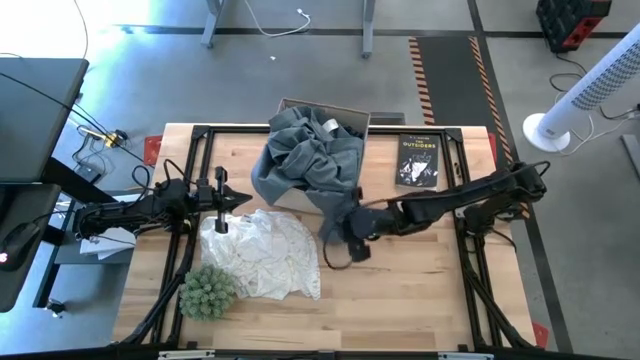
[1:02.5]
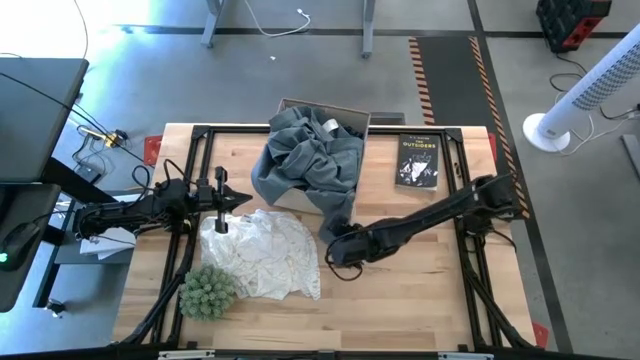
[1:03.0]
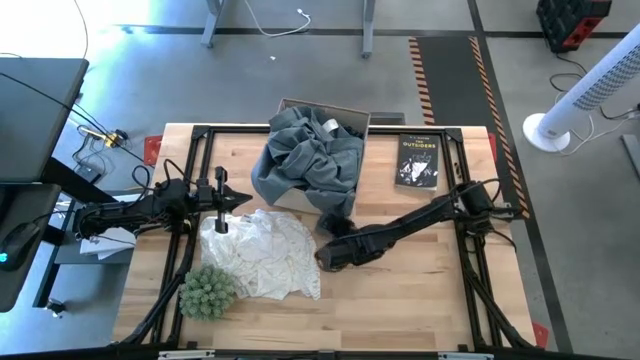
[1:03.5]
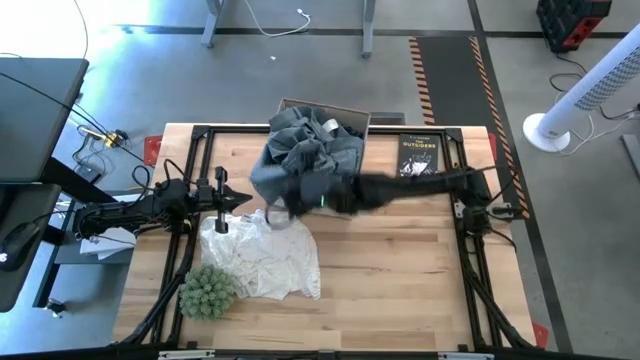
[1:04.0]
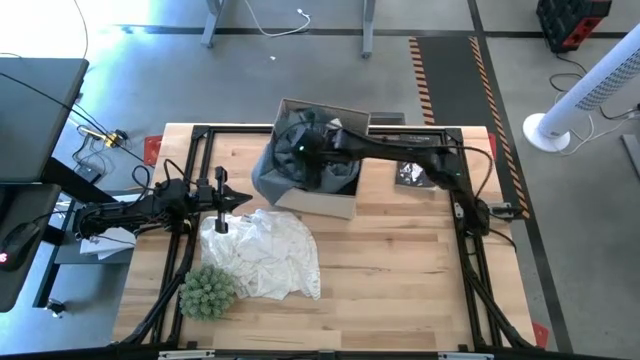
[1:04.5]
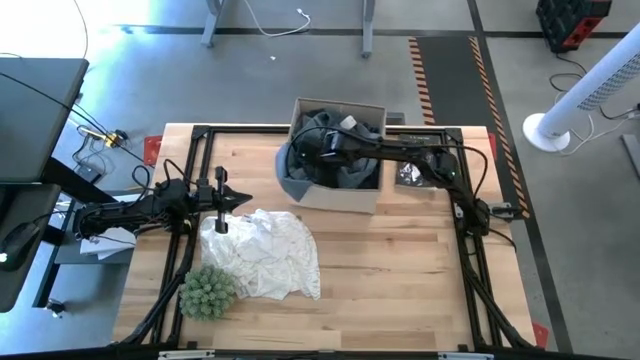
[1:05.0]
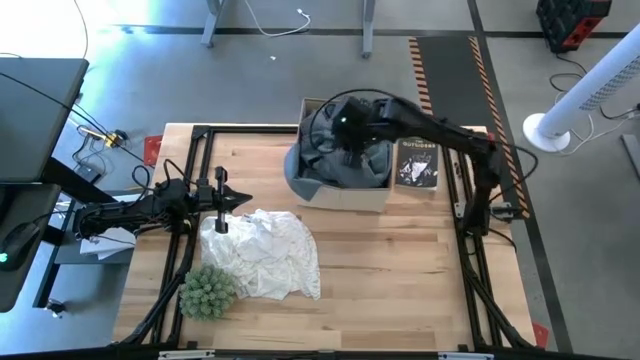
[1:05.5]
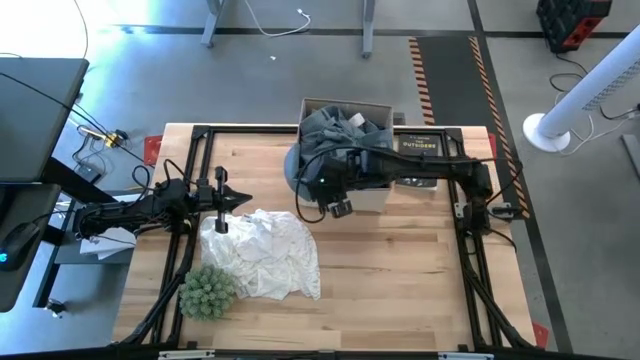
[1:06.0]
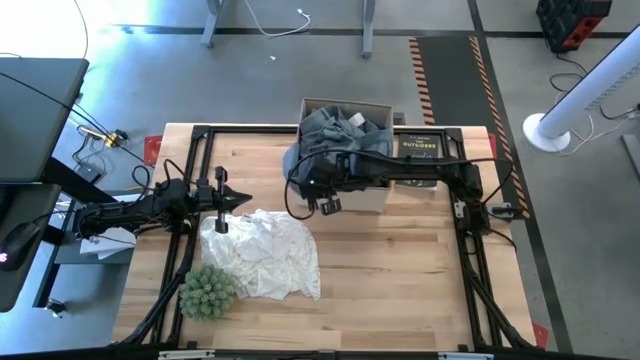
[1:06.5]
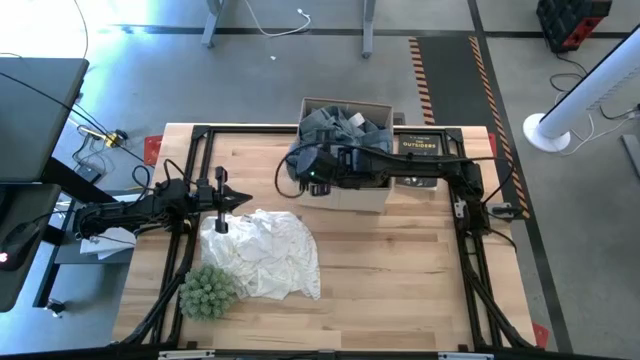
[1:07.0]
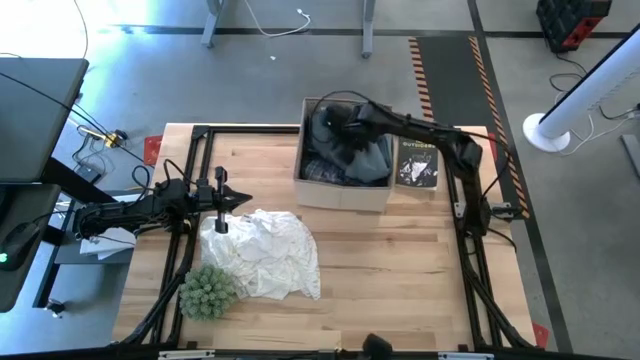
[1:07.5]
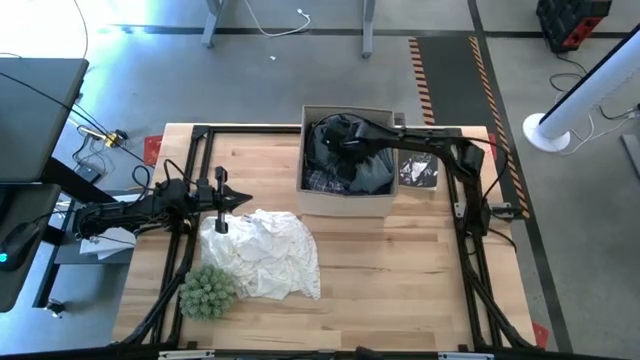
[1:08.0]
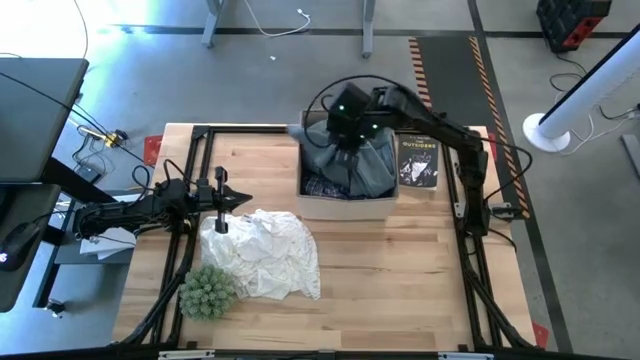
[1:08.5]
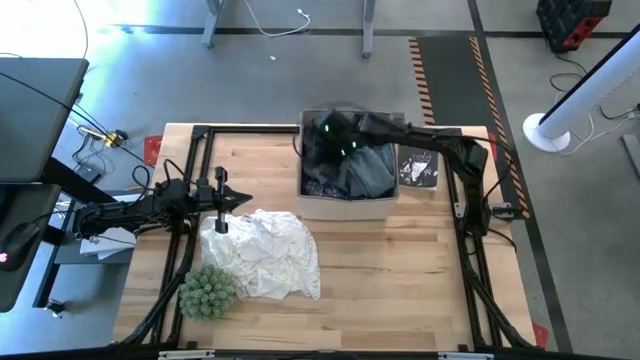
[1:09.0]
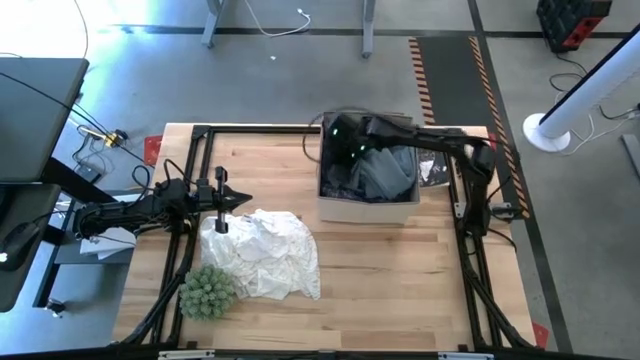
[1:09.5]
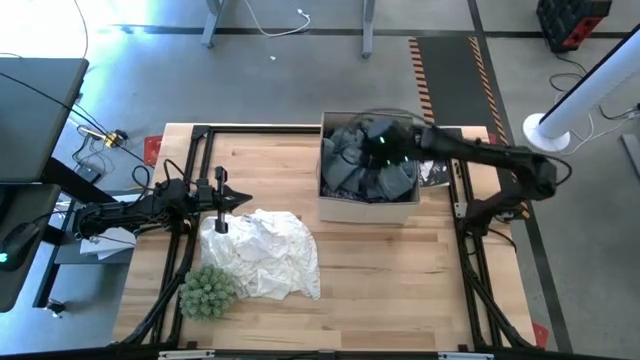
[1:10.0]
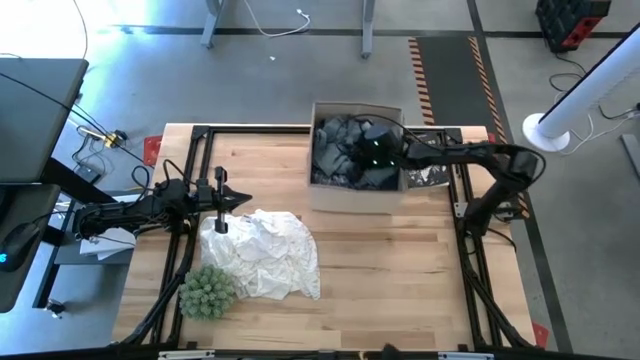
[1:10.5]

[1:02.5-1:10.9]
Task: Sort clothes
Put the gray pants into the white bin

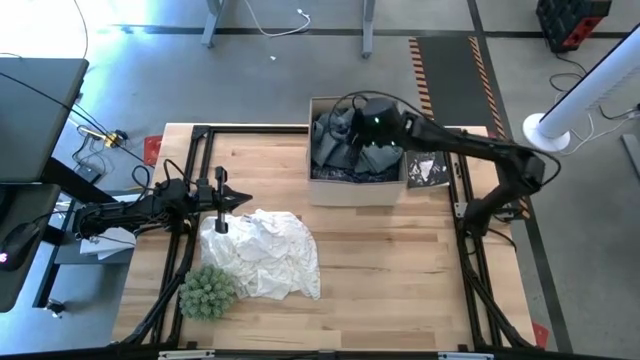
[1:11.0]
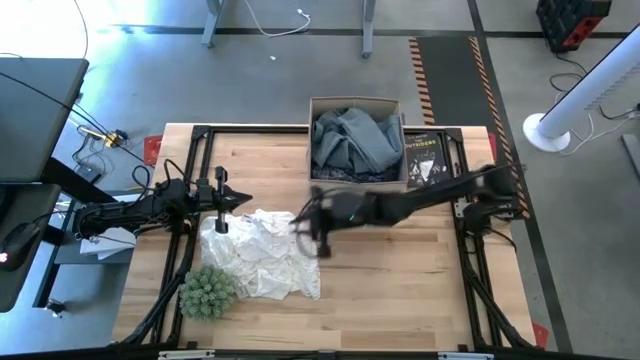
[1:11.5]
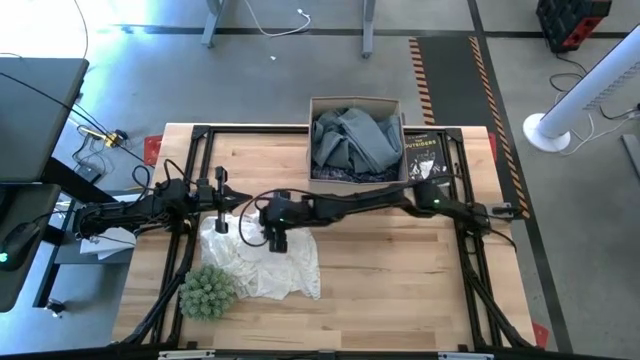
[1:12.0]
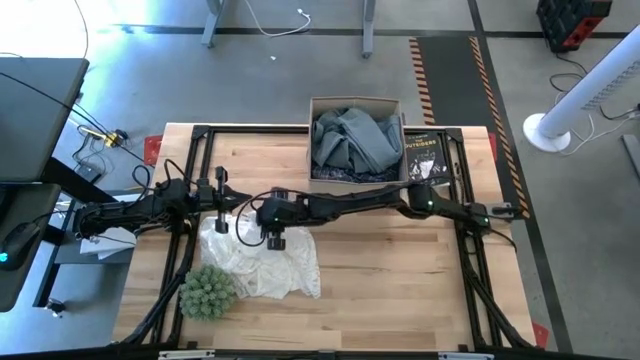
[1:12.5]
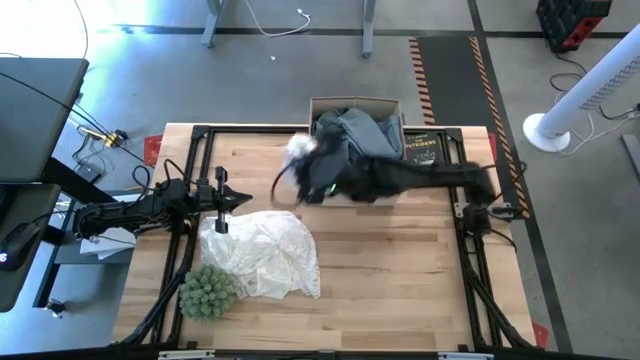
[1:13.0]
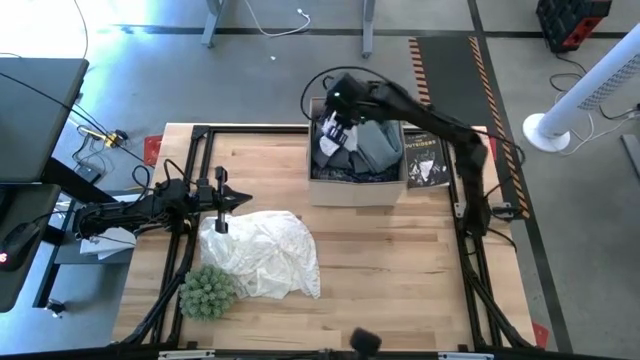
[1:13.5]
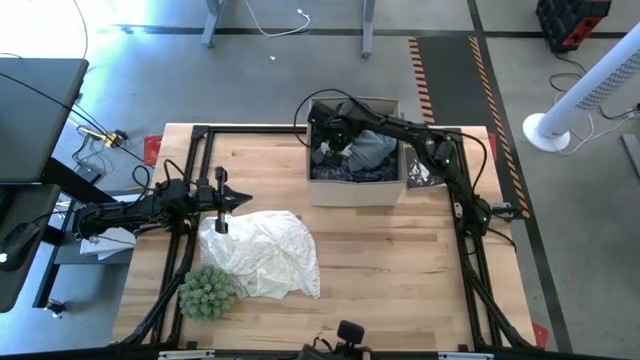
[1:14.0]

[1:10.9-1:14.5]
Put the white socks into the white bin

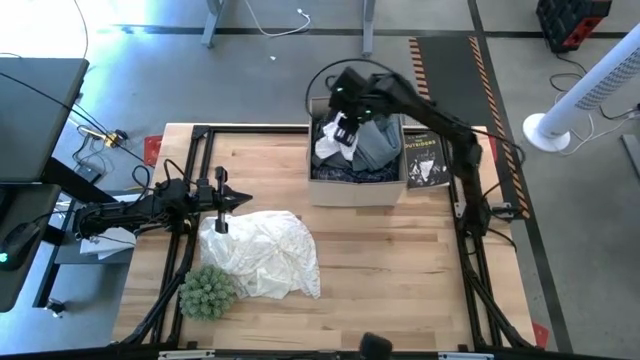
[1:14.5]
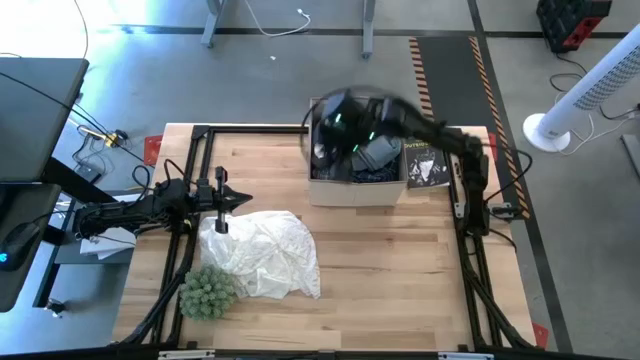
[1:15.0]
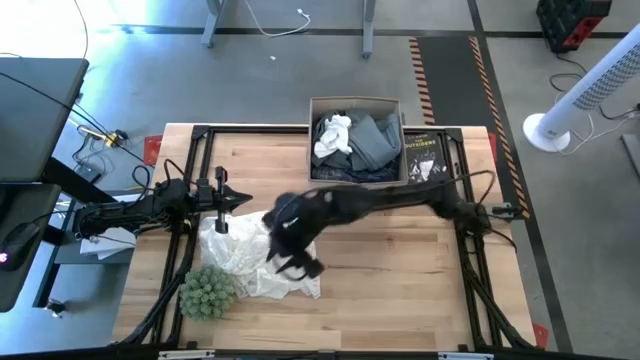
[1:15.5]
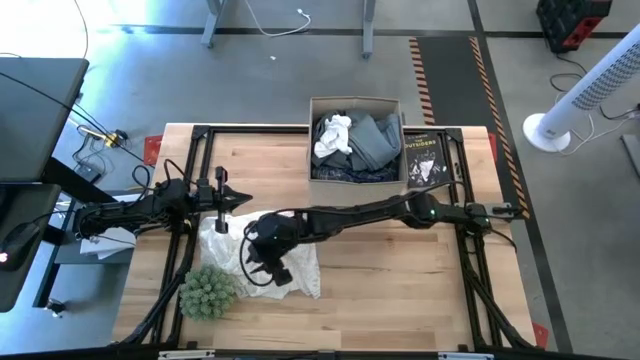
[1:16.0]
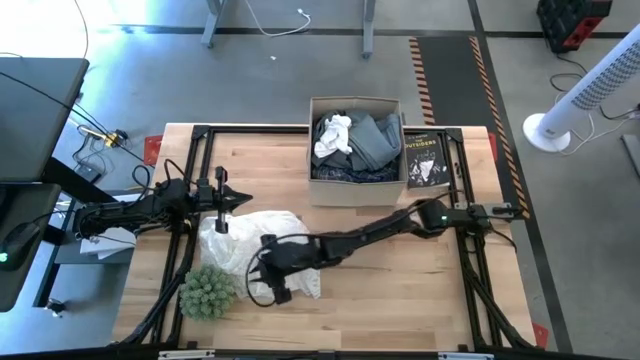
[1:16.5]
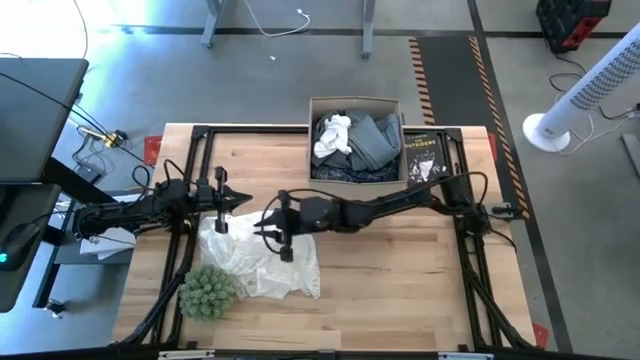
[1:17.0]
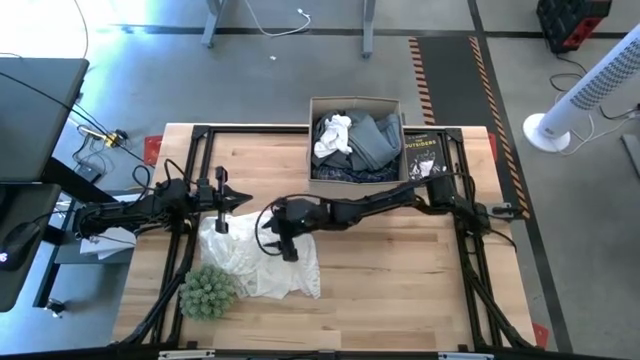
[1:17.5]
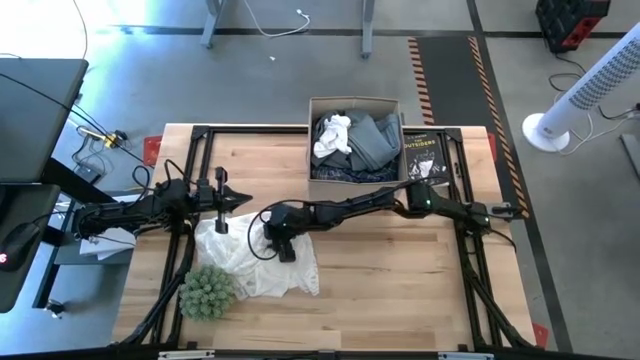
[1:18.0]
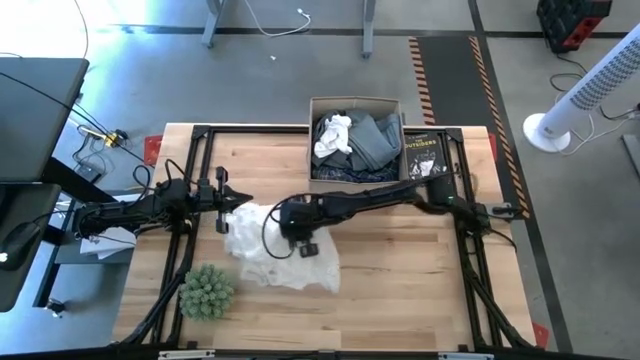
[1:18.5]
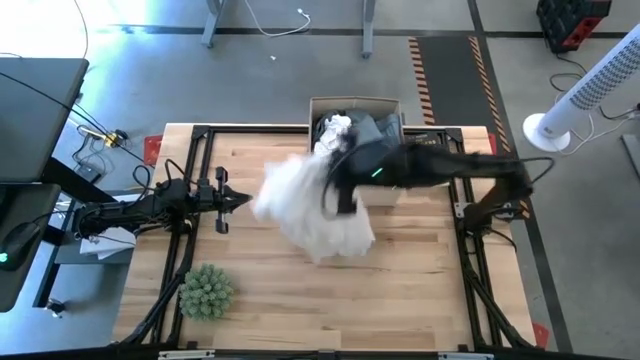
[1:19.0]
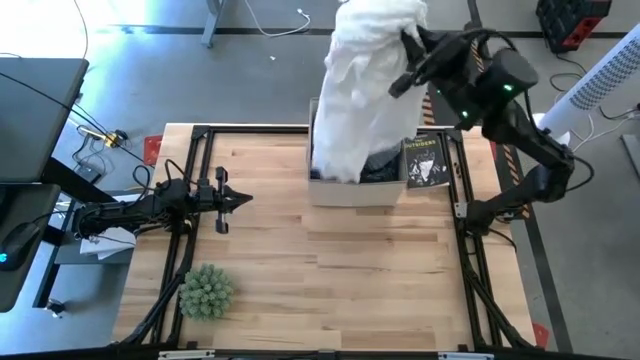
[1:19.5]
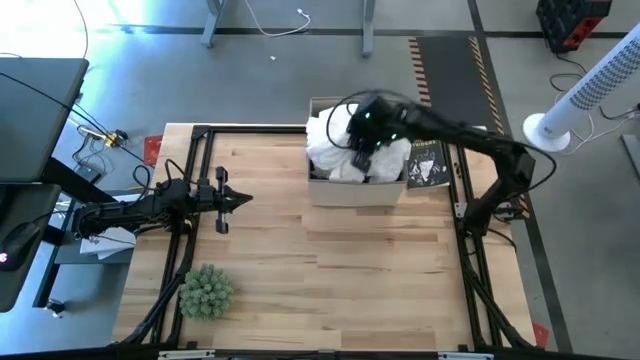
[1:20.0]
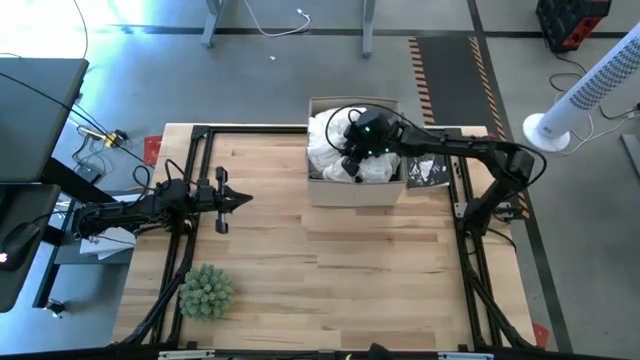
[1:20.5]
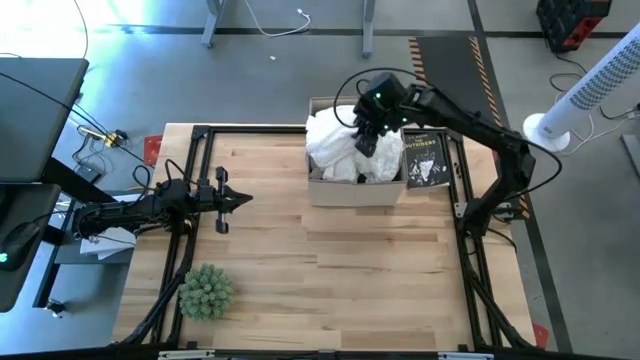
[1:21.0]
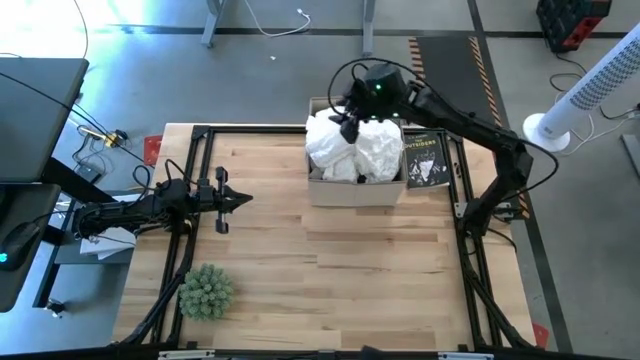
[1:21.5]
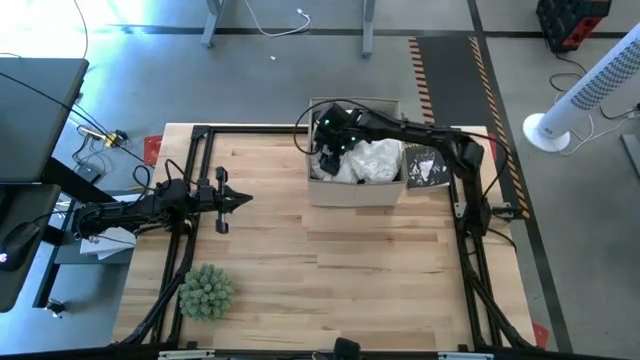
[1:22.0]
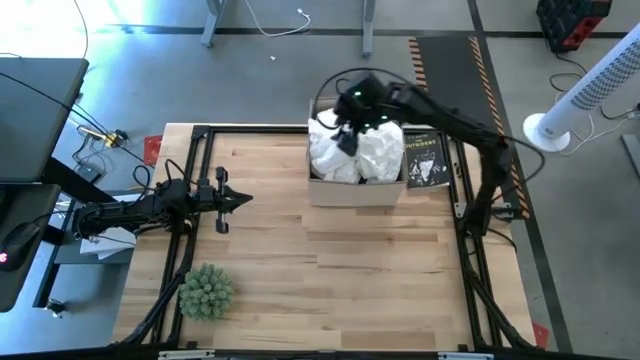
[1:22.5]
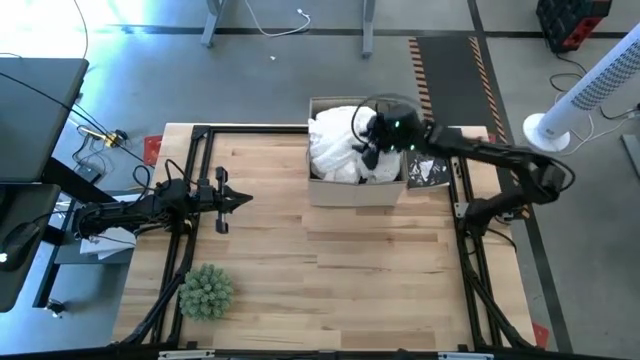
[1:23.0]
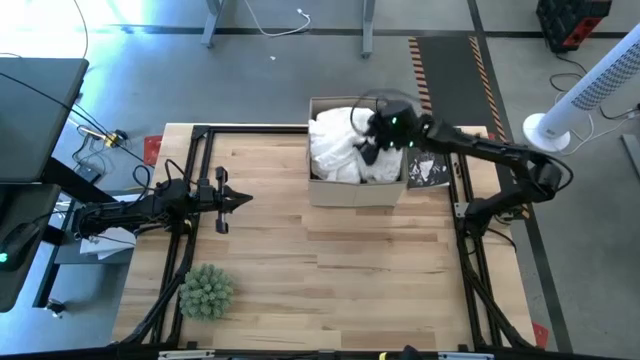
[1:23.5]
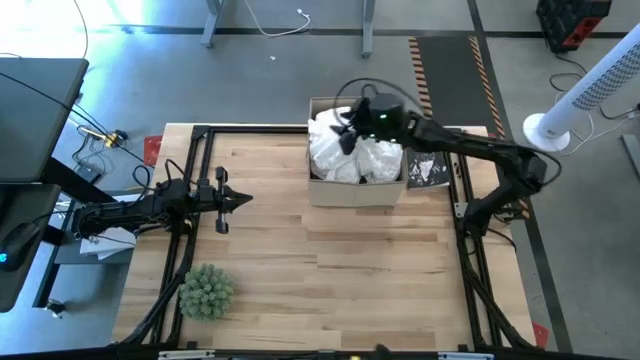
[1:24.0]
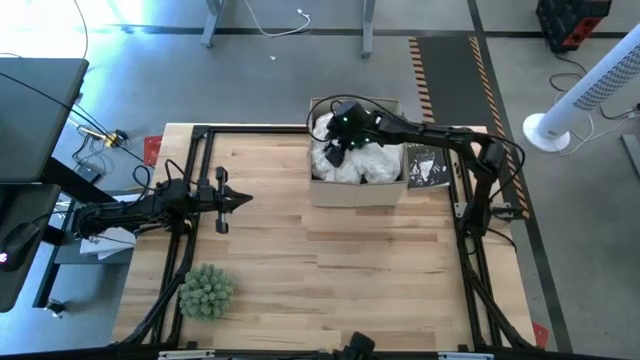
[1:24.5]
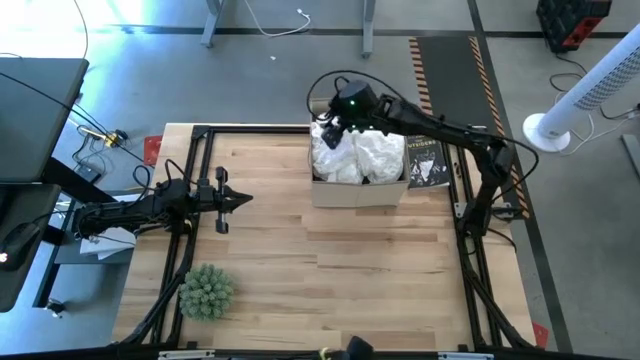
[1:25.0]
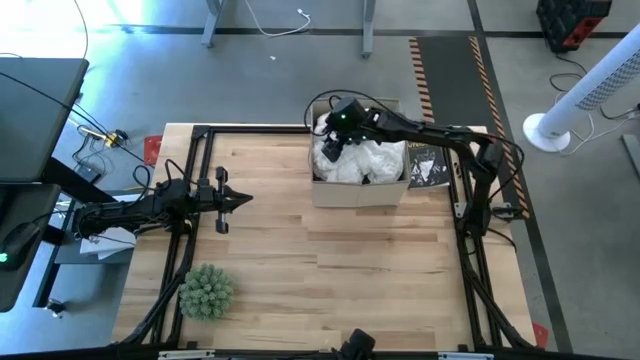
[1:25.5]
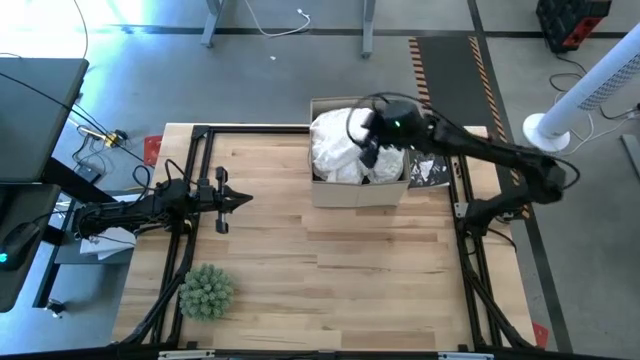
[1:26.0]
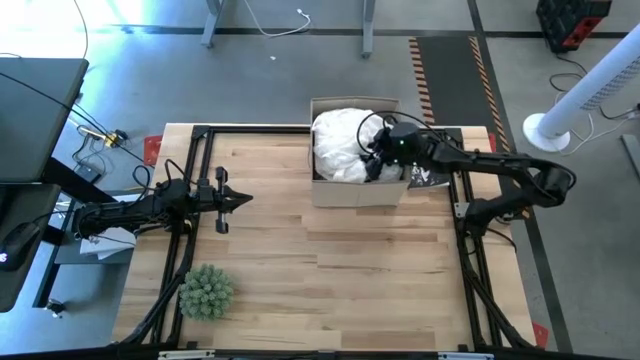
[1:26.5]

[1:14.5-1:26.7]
Put the white dress into the white bin
